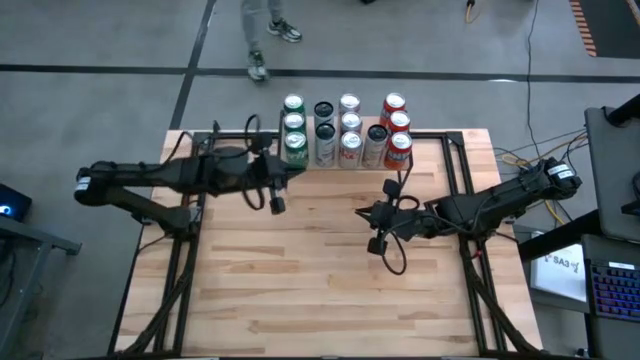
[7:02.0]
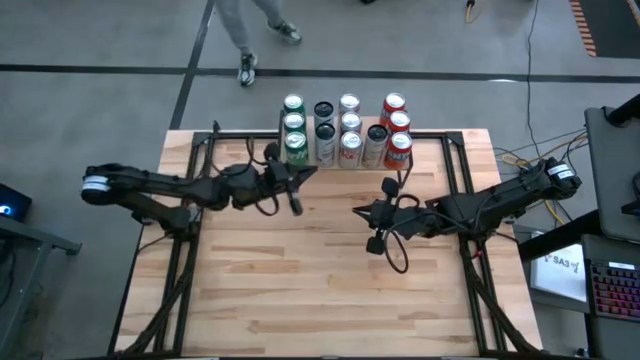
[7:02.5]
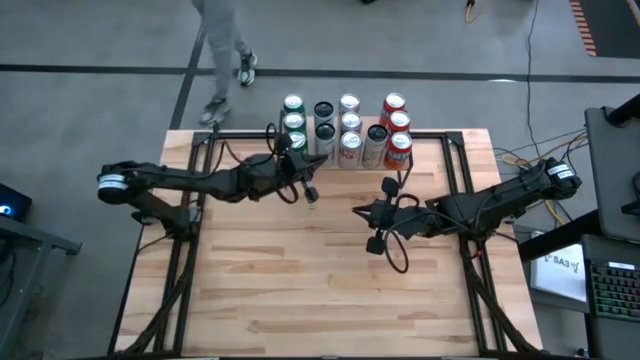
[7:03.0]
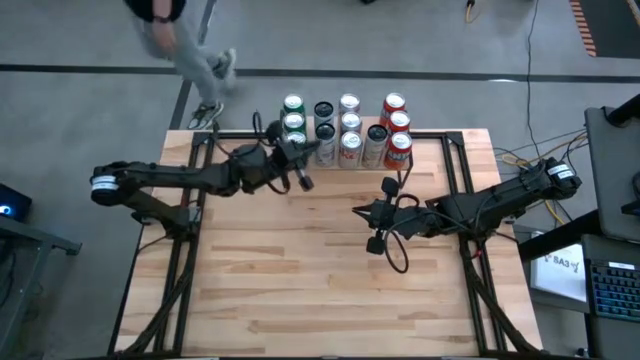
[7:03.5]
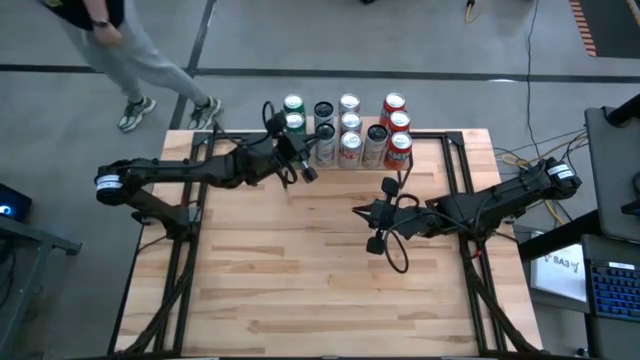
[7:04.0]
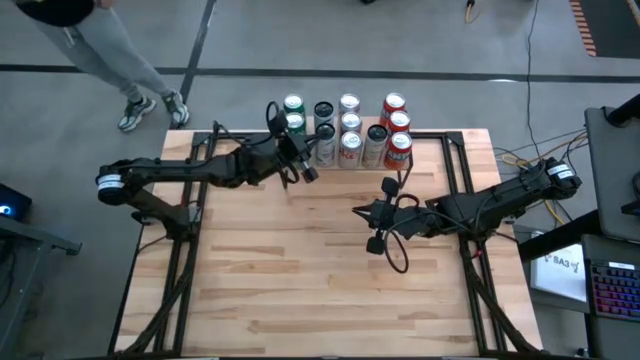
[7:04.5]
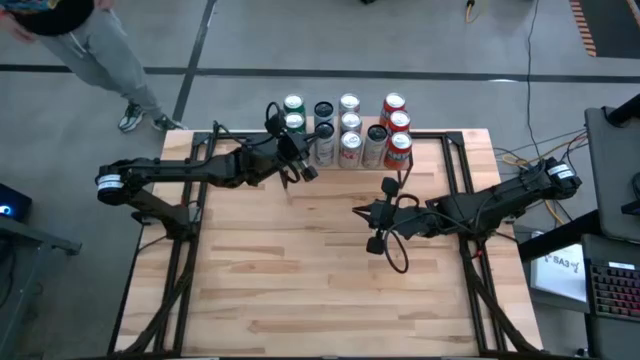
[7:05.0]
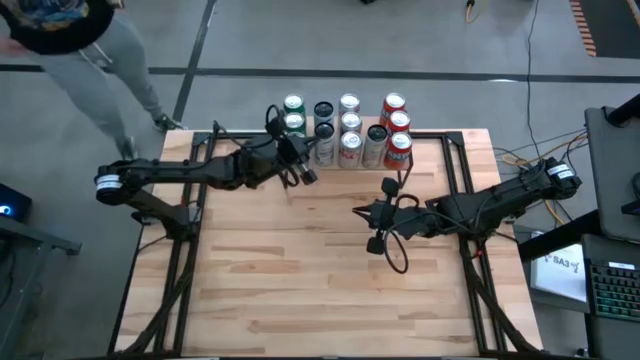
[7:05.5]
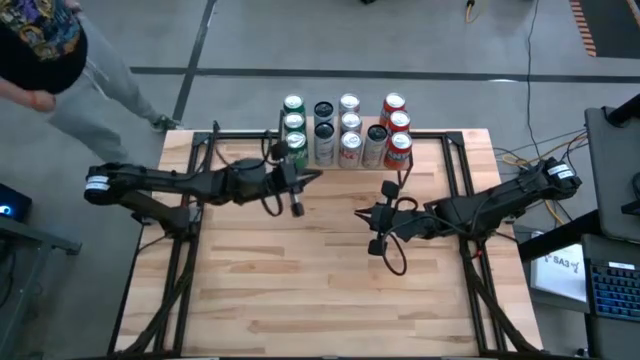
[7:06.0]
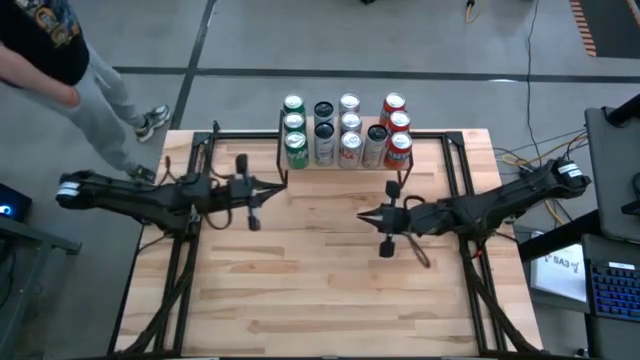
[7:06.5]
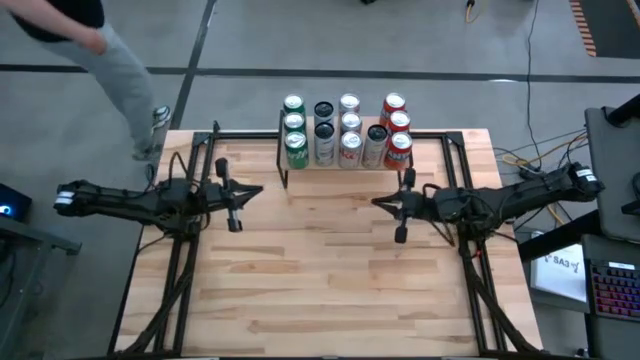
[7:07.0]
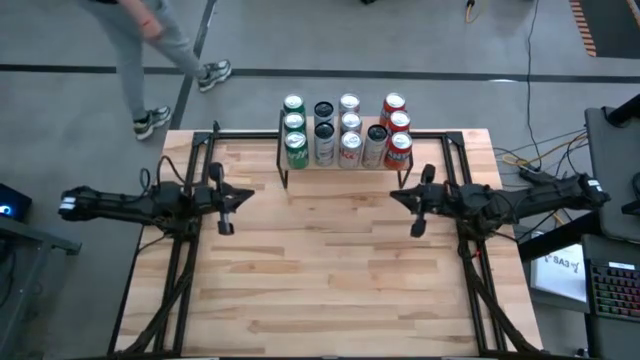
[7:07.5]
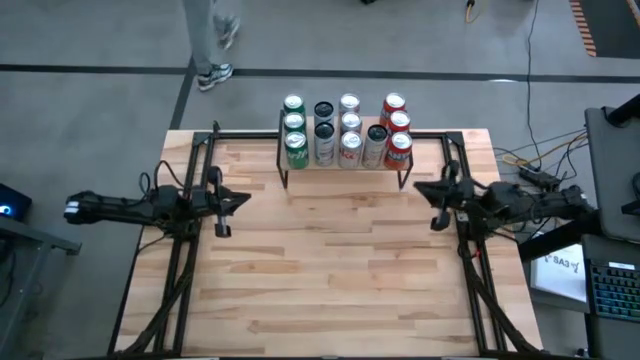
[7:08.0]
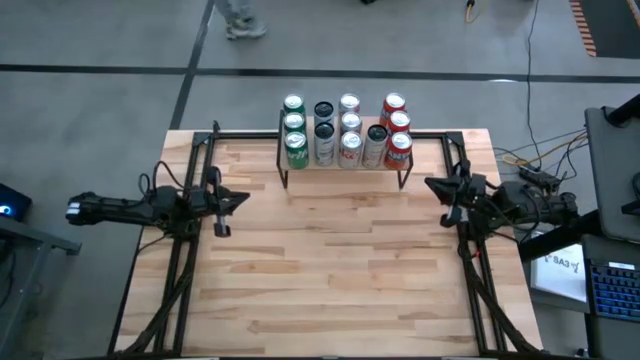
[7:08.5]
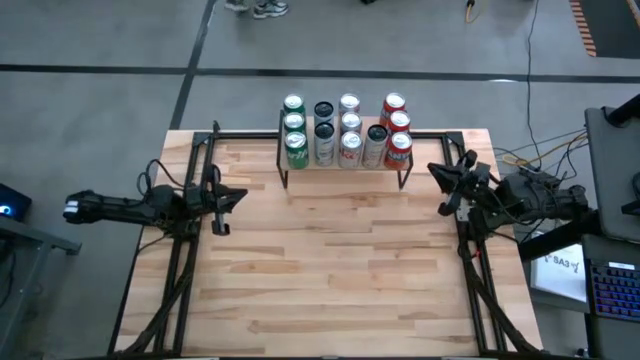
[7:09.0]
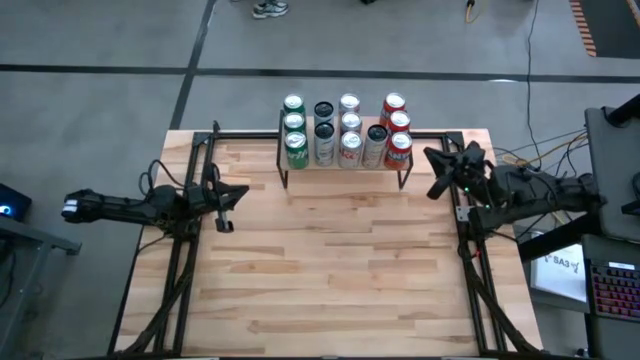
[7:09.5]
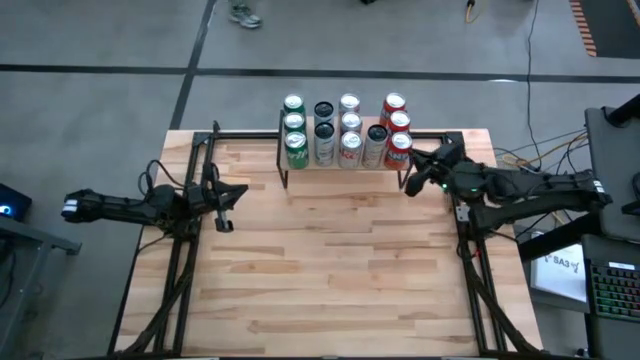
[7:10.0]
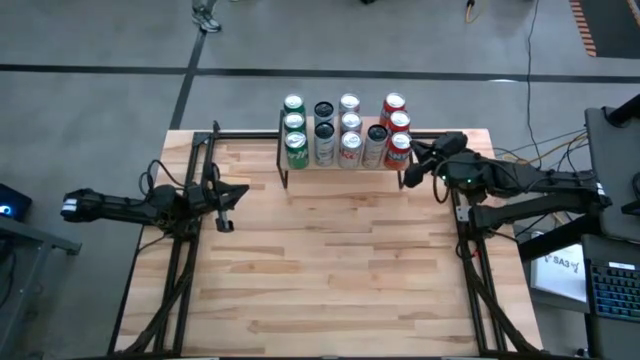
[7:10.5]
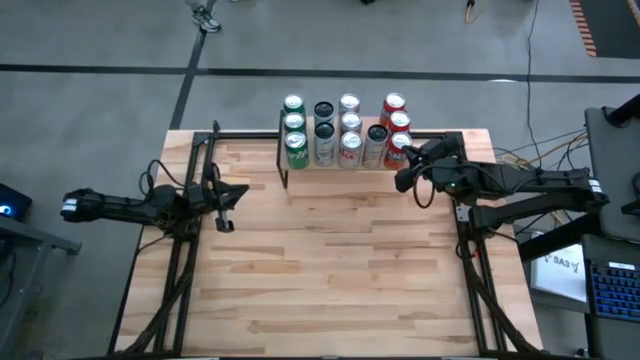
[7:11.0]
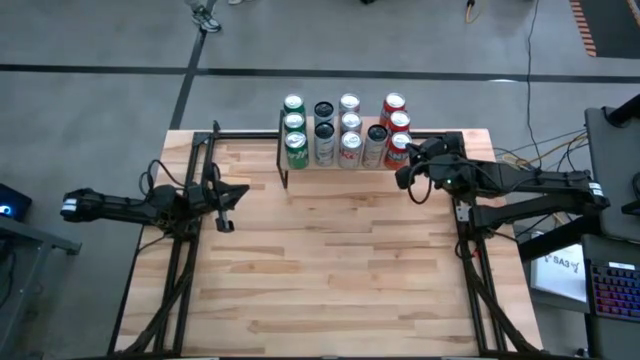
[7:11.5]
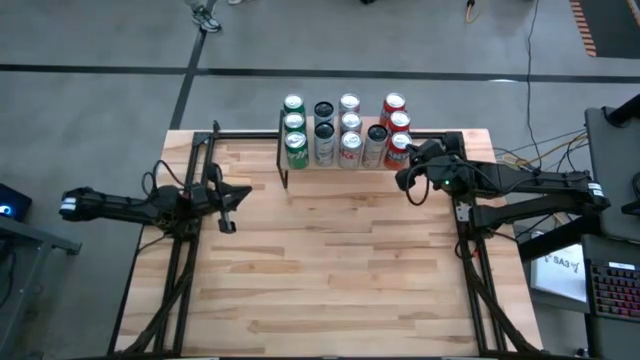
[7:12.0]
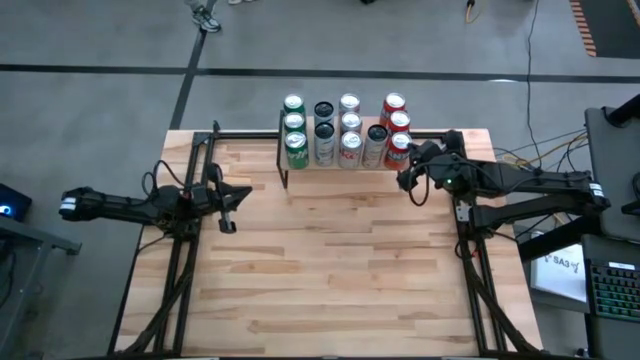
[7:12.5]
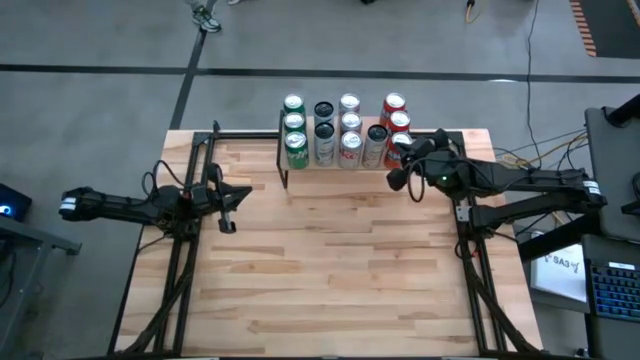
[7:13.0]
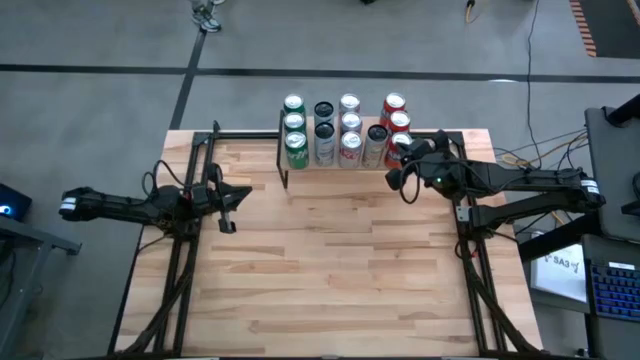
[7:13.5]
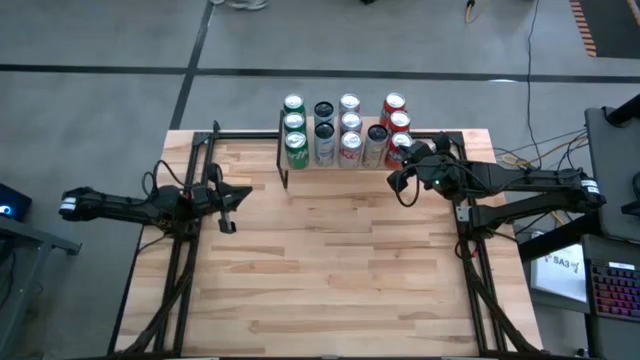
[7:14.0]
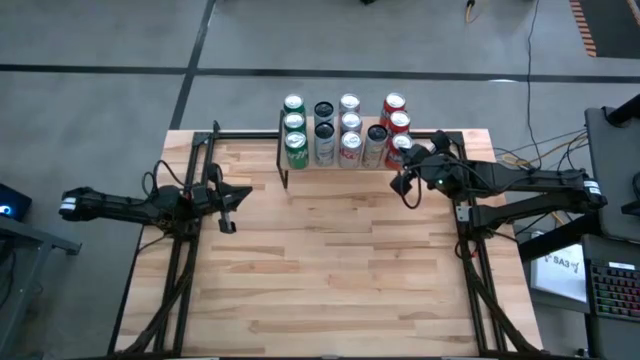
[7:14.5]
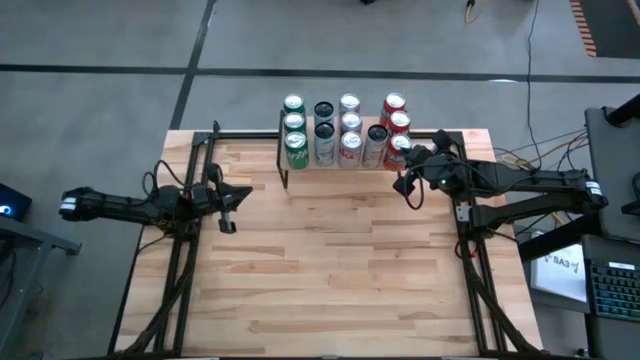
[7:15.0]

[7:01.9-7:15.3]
Task: Place canned beverage on shelf
Adjust the soda cans on the shelf

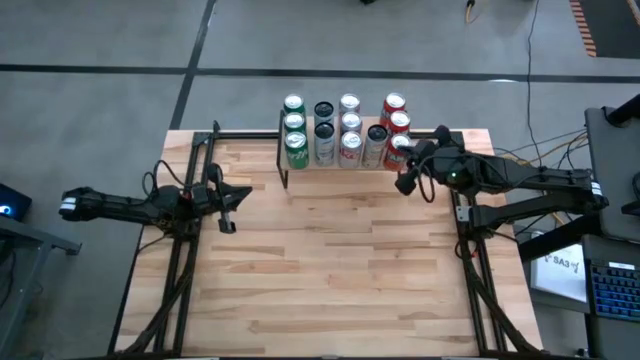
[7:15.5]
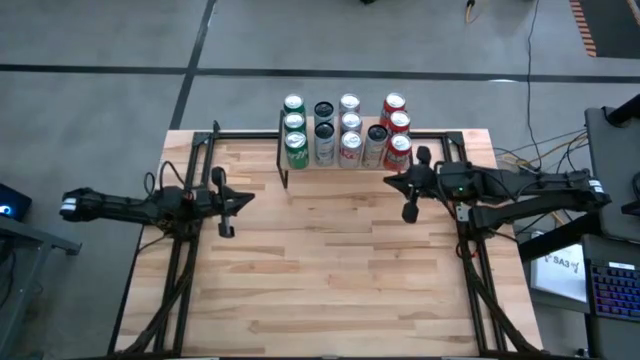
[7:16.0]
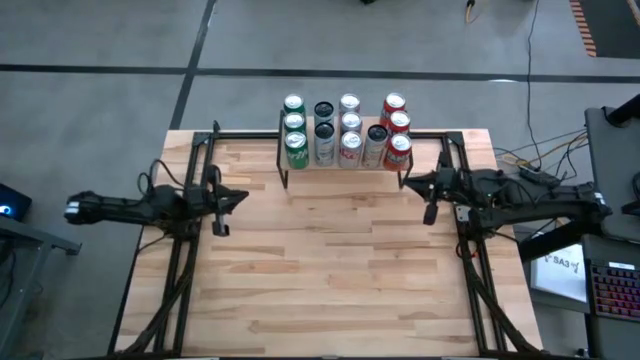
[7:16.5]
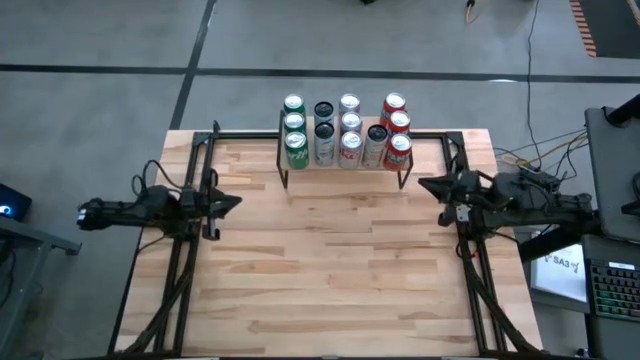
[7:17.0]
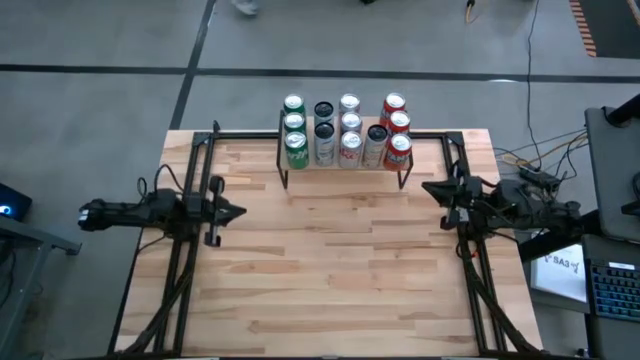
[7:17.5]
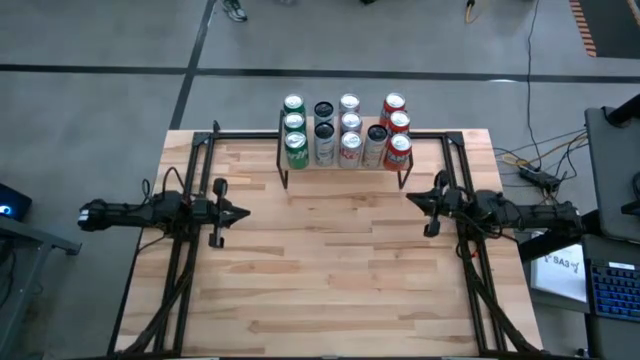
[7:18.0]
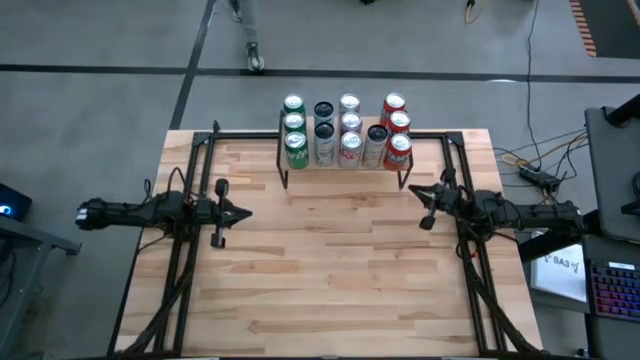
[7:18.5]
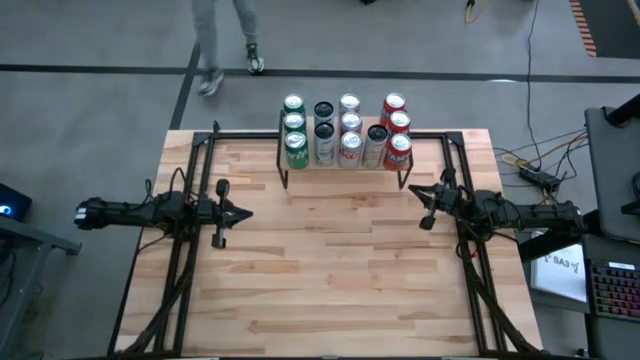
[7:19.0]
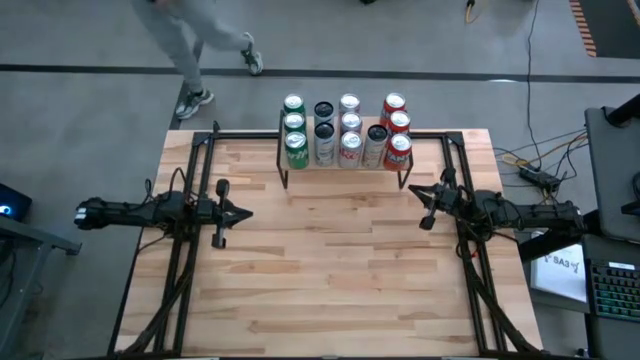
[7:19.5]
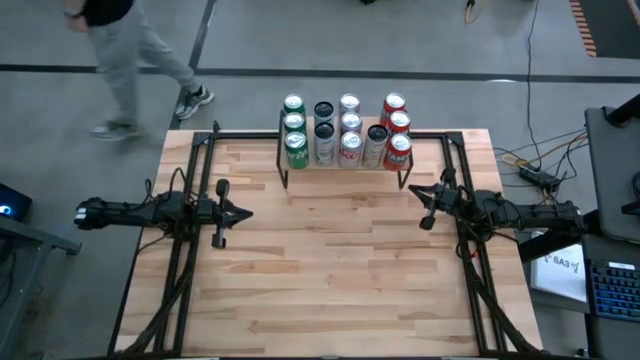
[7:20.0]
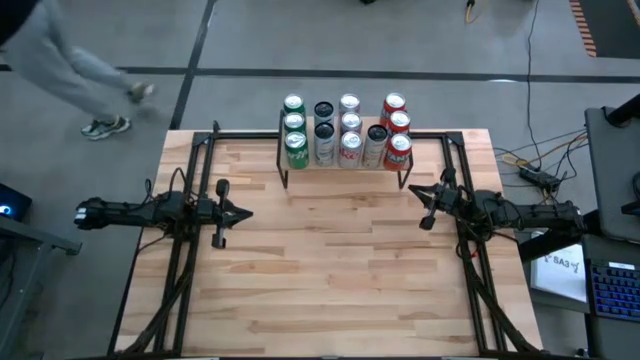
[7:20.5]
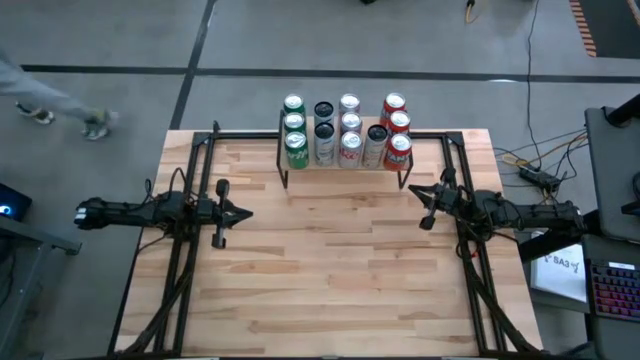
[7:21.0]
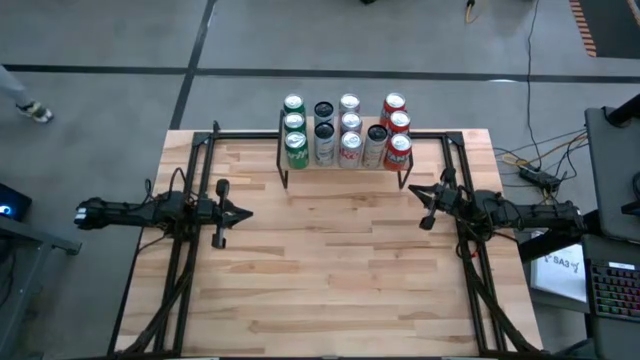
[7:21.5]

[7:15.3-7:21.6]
Return to Home Position
